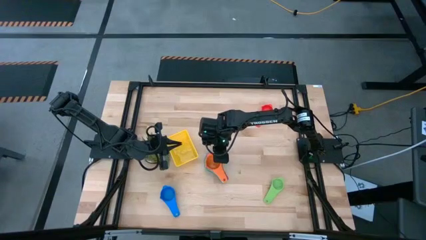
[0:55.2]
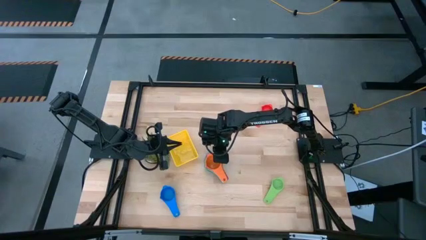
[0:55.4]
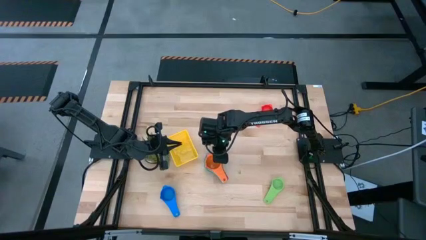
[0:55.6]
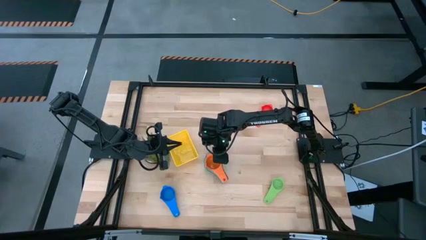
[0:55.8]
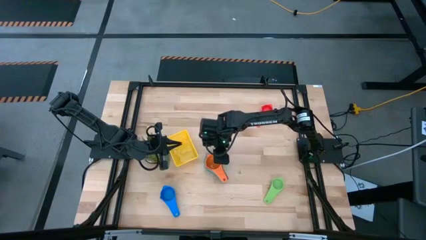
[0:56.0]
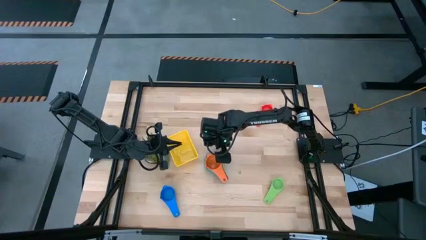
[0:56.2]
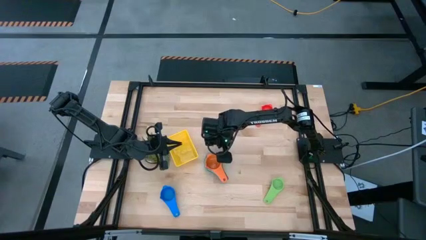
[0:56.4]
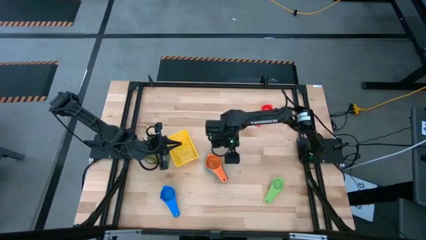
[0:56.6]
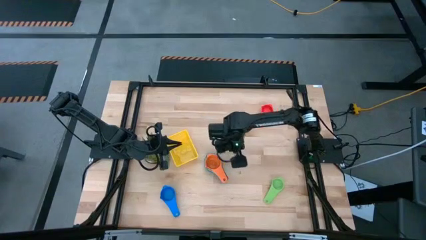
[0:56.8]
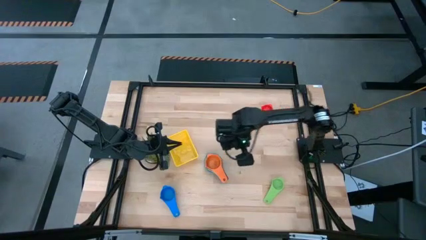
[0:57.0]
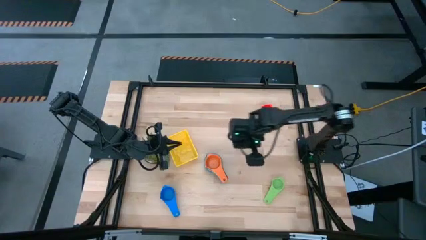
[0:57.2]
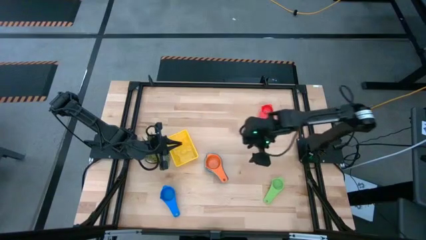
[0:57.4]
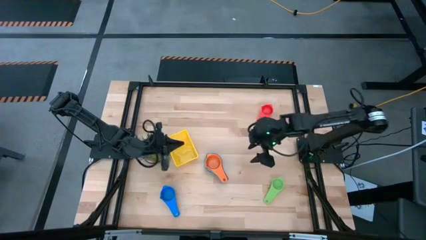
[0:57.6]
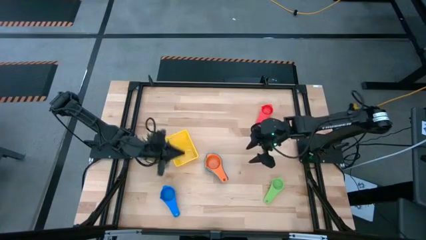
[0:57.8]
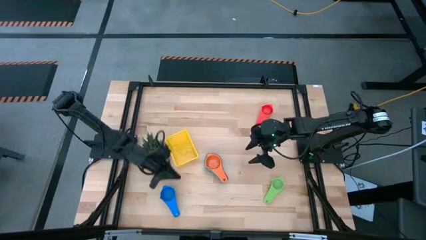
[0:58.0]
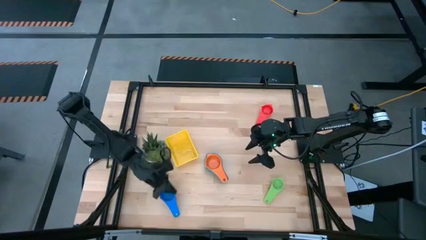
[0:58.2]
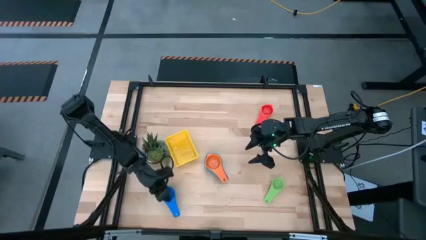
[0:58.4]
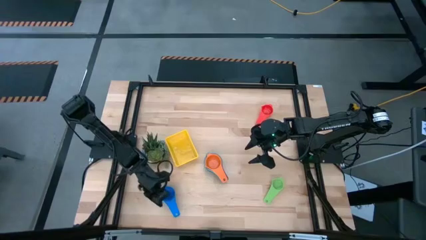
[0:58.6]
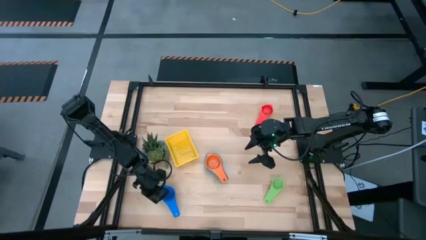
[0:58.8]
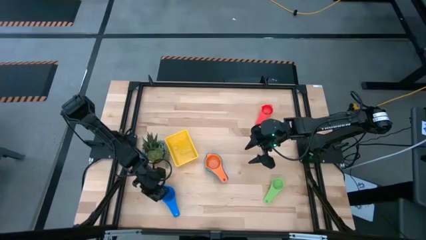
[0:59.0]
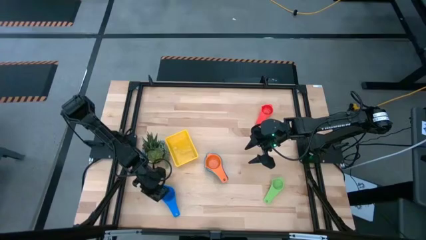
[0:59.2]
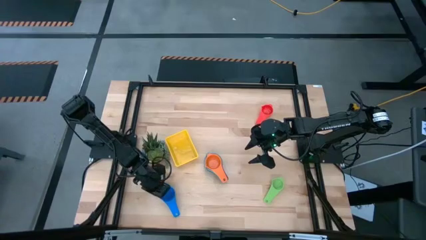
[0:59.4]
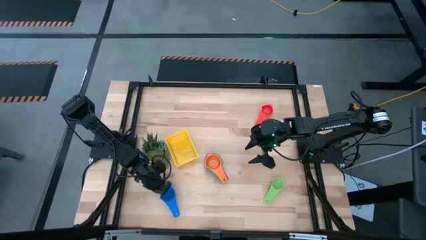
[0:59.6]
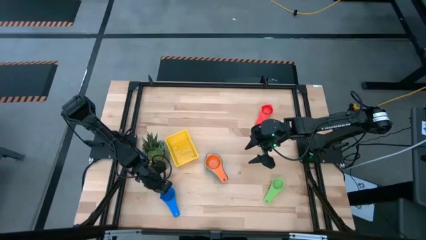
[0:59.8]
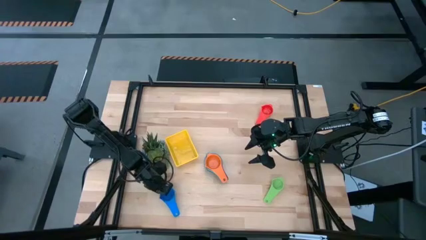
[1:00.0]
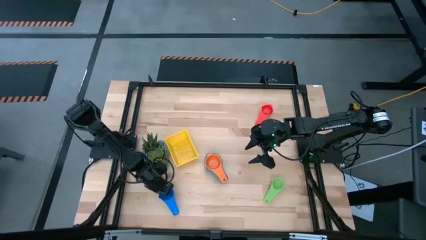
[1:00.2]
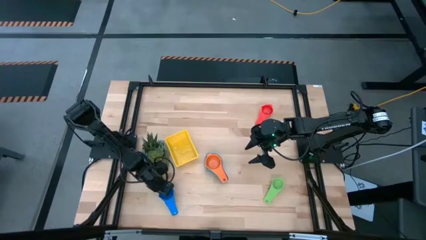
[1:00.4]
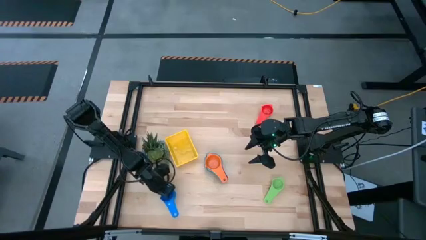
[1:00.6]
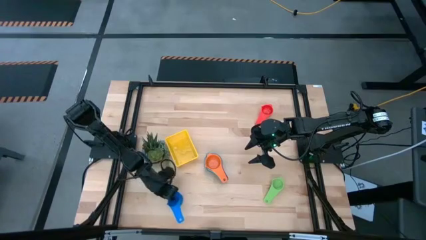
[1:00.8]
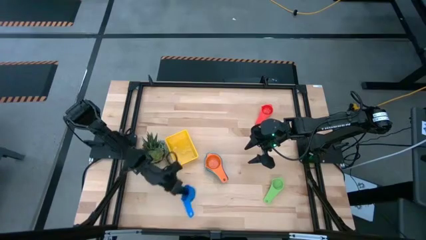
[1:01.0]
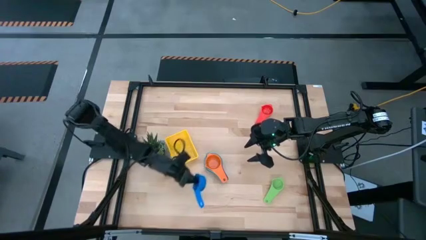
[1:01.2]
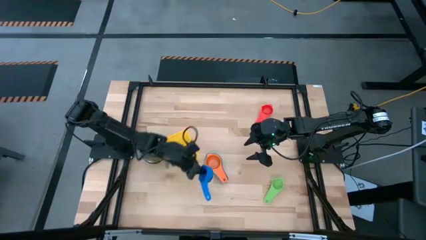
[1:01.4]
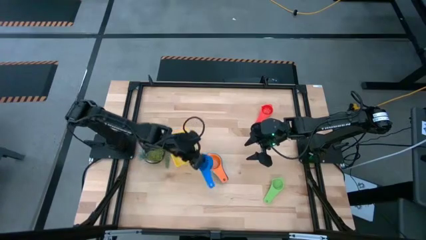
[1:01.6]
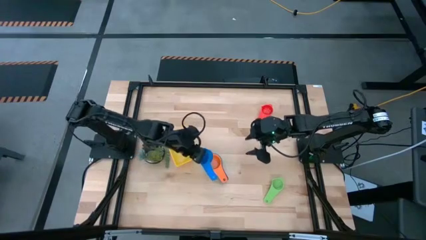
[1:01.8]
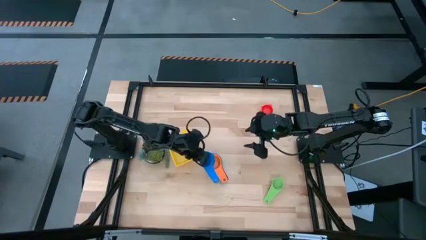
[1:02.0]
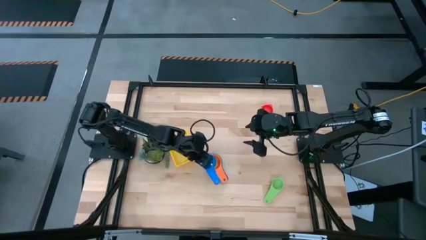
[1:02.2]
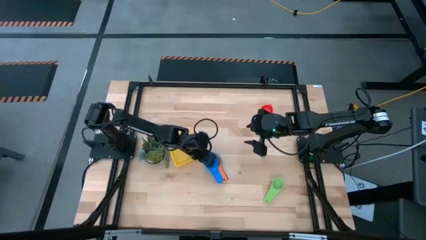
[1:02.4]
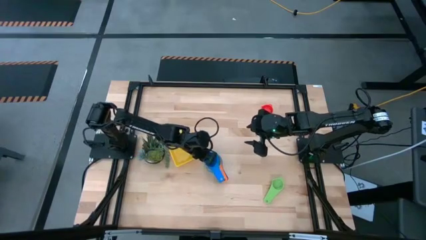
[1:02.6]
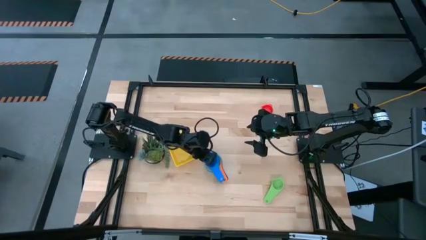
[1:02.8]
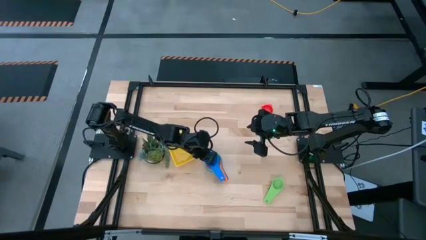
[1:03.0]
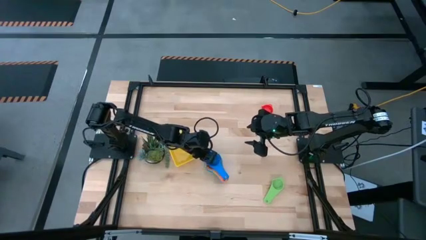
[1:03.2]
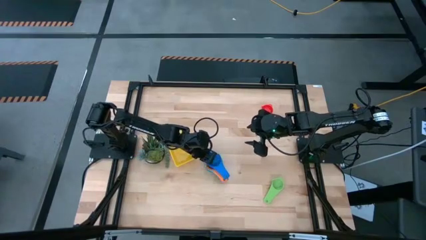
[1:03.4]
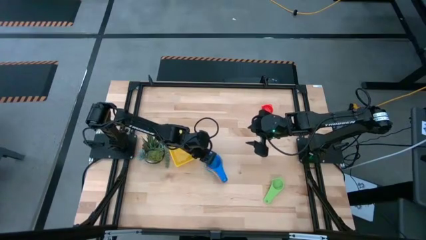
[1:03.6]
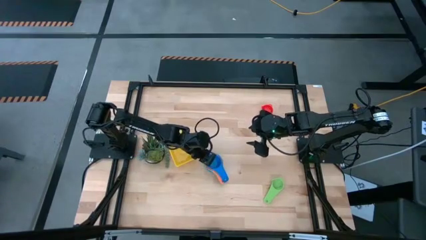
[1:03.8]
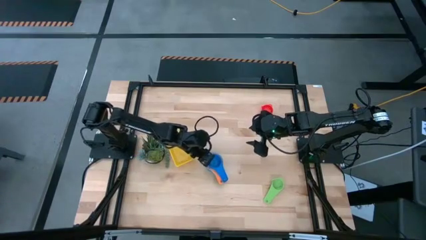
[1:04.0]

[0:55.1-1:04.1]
Task: Nest measuring cups in basket
Stack the blue measuring cup on top of the orange measuring cup

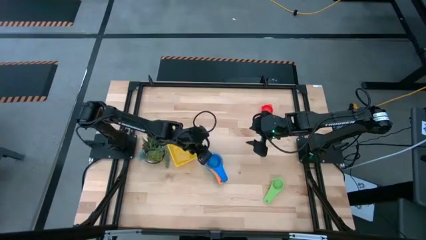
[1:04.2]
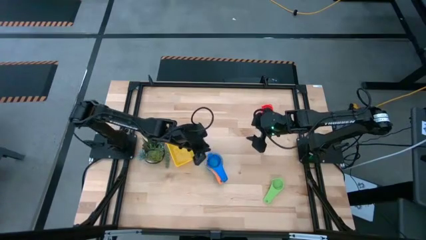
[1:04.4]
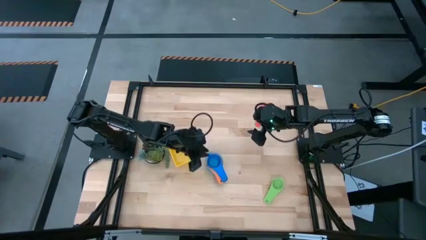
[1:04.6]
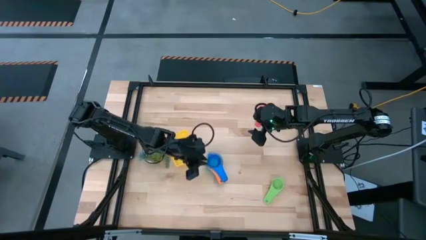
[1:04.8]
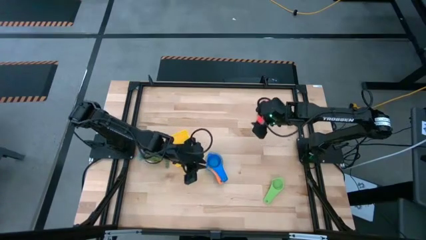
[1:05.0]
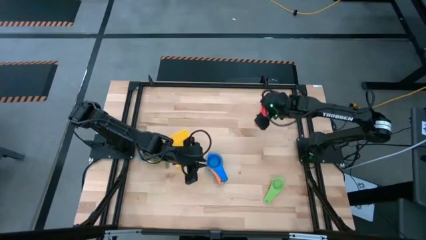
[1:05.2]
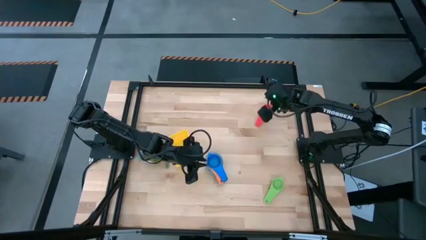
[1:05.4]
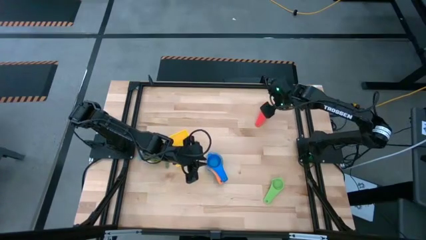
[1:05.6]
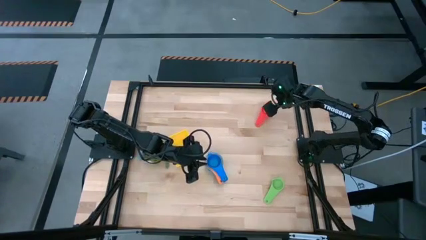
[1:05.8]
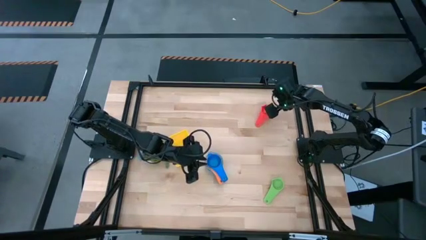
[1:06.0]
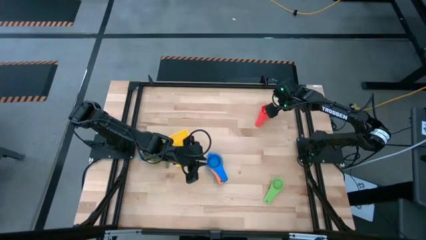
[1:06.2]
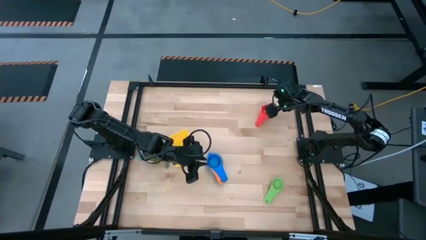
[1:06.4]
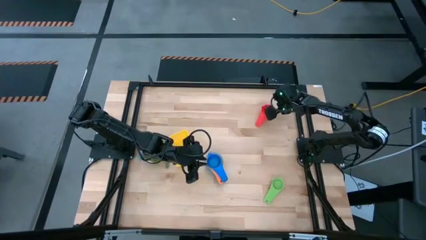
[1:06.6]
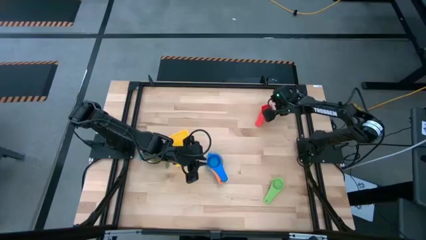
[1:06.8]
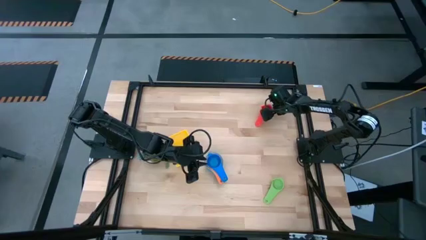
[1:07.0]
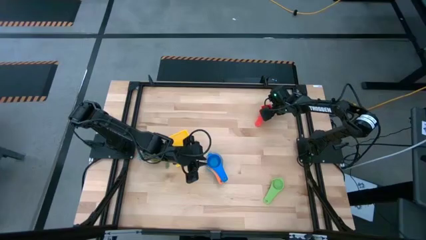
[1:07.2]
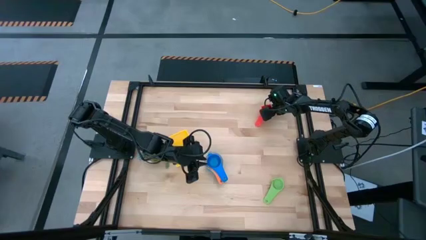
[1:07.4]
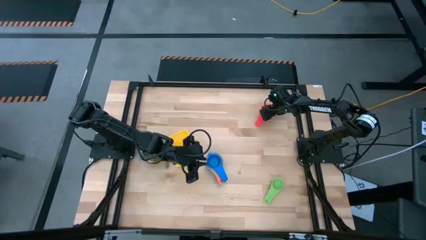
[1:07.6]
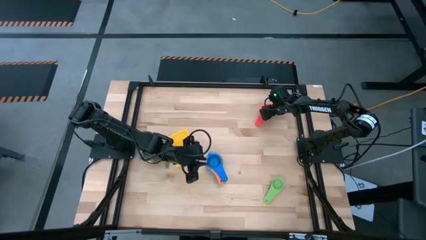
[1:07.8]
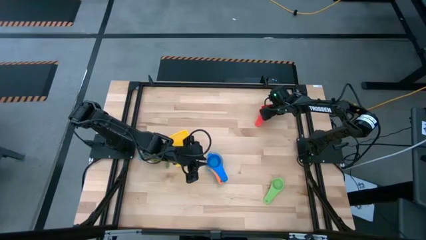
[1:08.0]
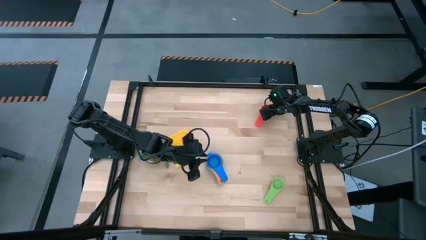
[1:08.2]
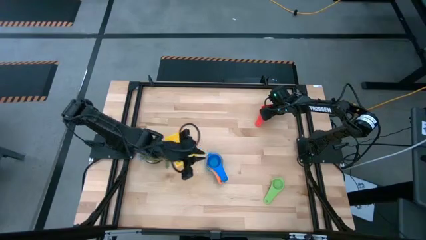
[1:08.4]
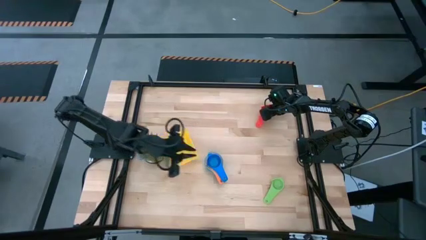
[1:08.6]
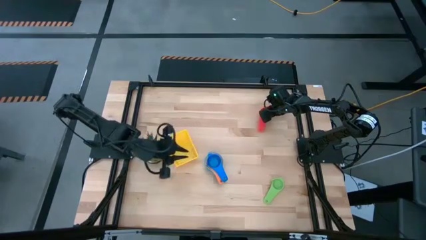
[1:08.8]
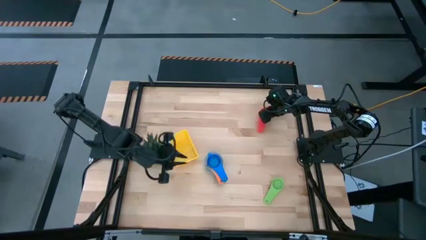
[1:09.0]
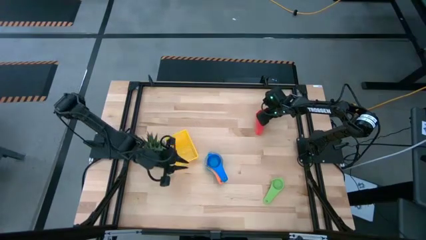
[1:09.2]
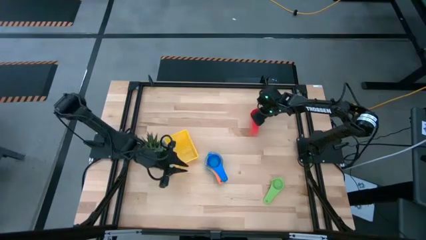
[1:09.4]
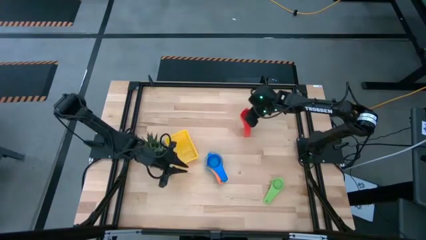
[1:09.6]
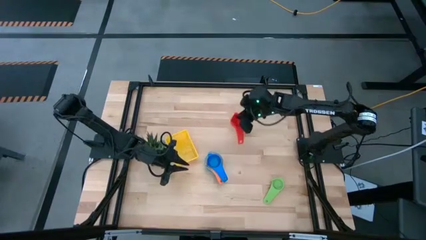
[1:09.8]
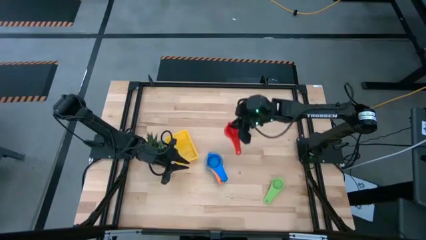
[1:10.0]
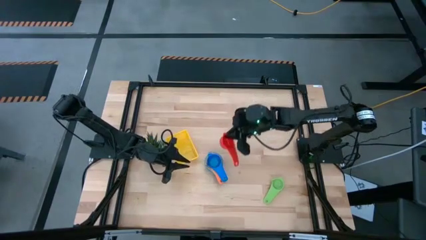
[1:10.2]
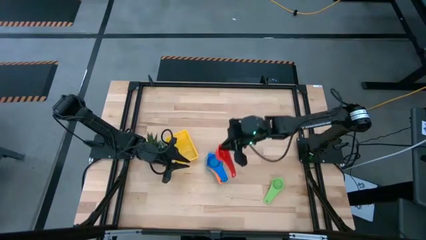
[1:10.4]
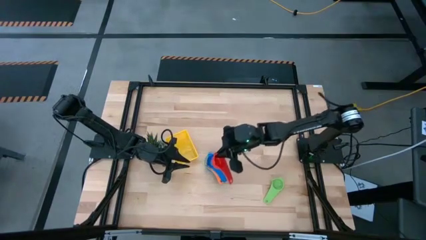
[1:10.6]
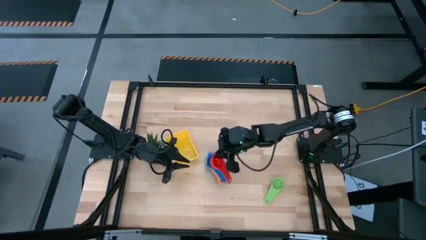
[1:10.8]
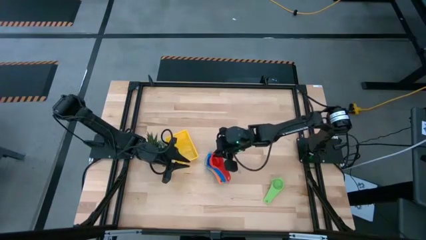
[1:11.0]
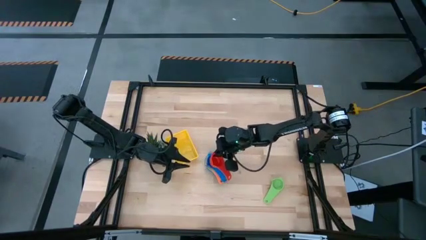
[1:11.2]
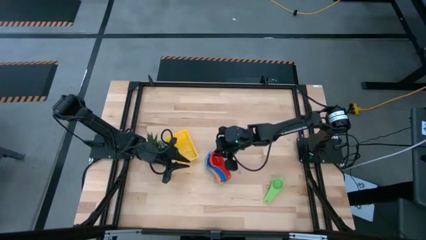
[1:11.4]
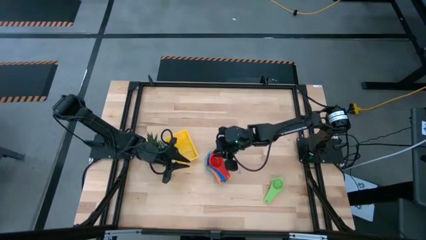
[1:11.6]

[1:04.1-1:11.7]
Stack the red measuring cup on top of the blue measuring cup
